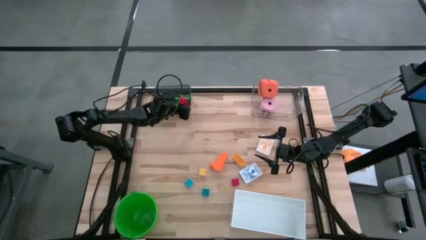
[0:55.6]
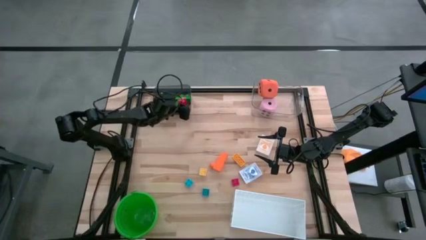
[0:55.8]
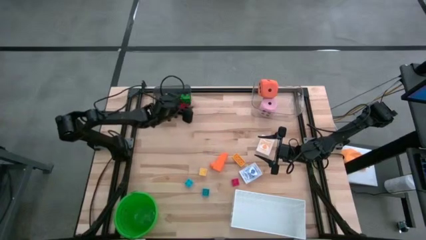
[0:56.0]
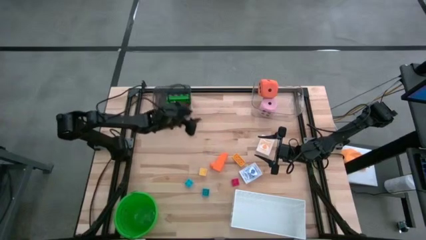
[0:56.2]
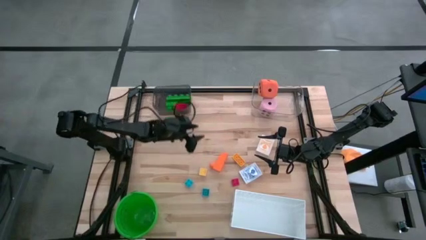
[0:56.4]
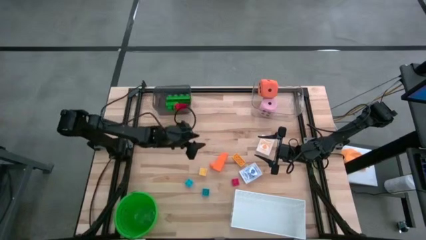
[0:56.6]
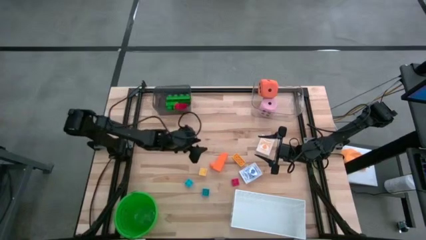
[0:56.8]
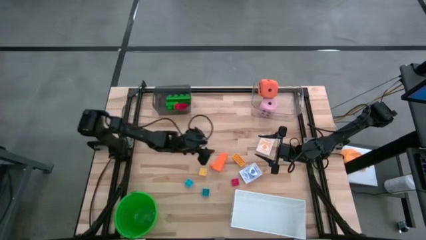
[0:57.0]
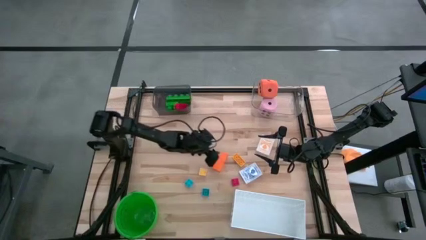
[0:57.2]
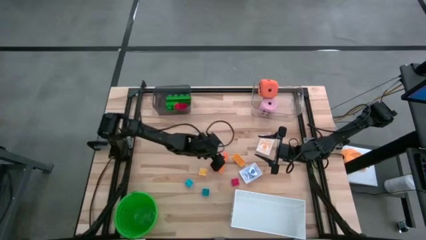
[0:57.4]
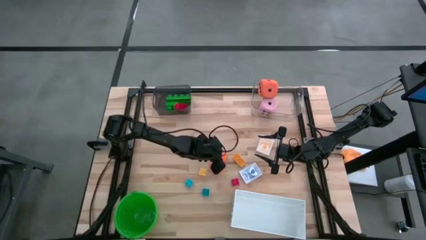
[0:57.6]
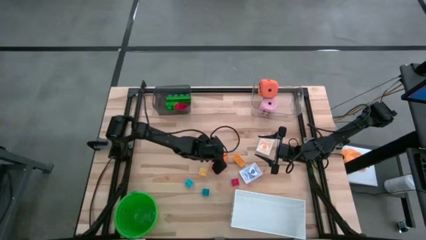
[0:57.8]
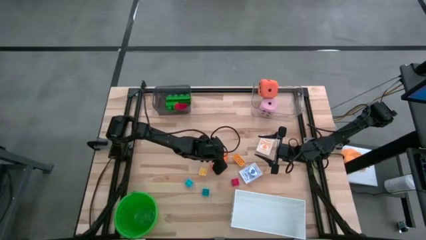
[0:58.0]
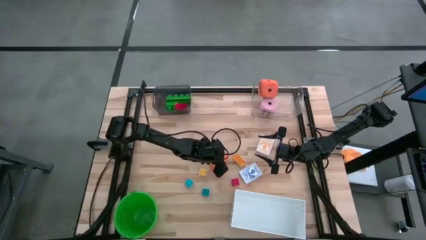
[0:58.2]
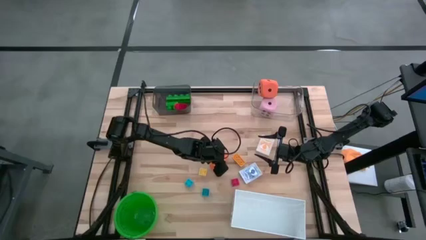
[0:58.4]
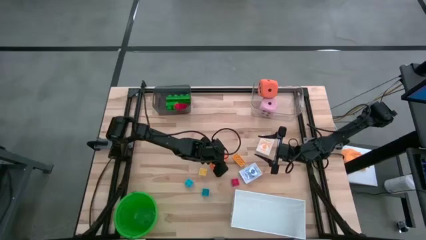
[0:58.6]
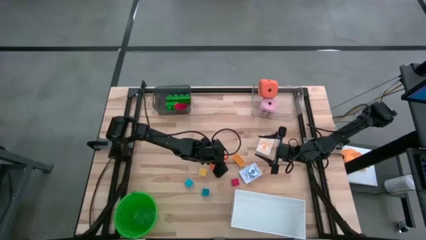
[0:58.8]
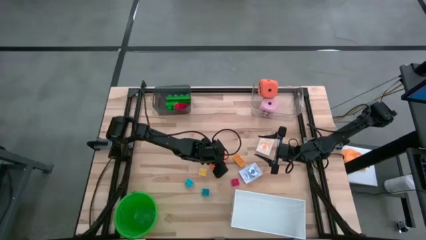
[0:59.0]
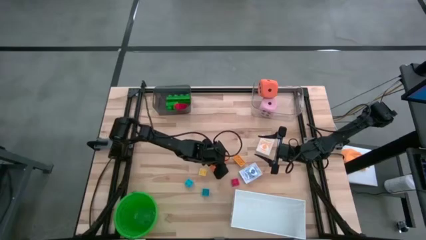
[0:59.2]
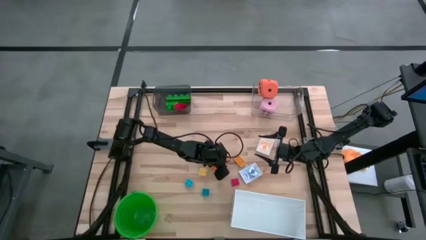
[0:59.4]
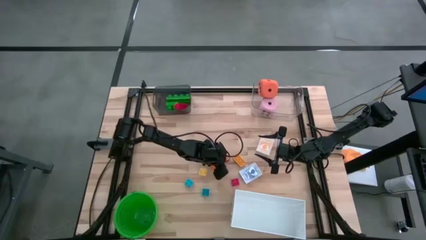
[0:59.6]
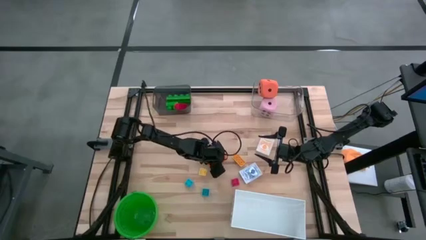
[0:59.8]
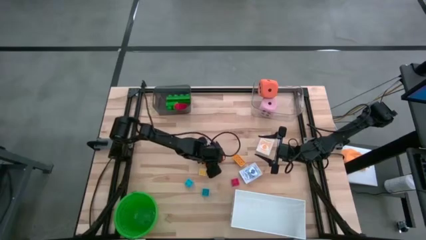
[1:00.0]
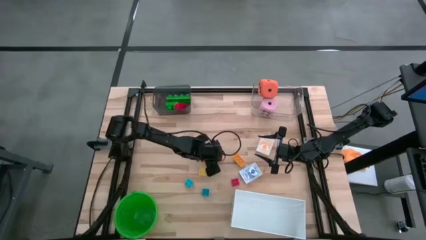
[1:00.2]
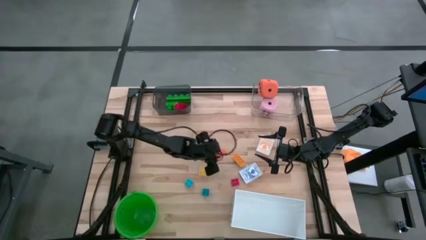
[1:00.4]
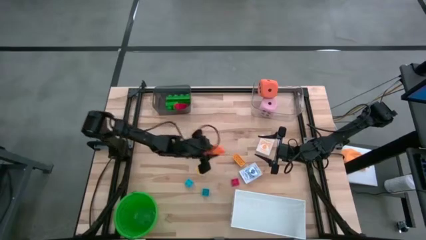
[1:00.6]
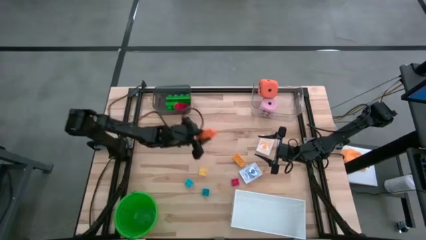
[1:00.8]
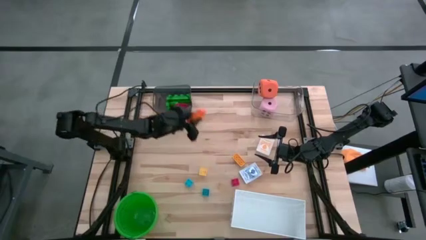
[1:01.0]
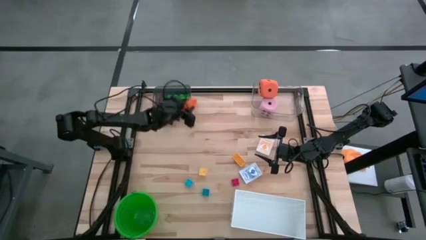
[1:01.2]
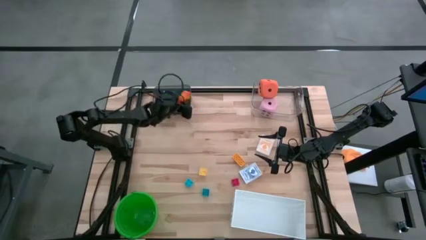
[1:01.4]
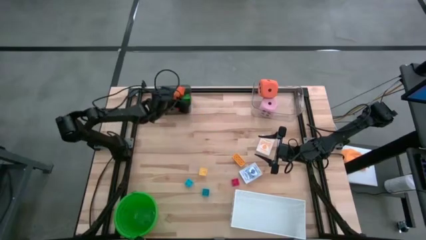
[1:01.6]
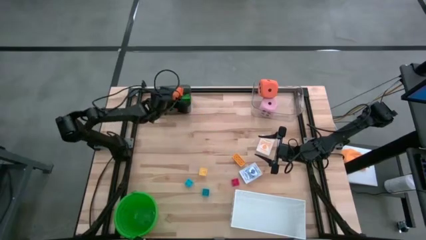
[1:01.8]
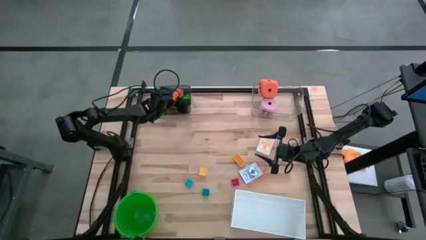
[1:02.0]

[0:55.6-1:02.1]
Task: Pick & Place Toys
Put the orange game piece into the black bin

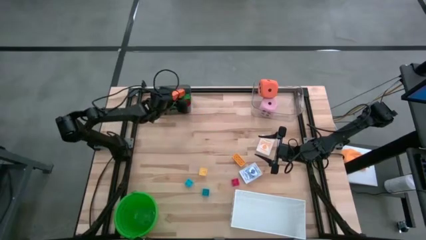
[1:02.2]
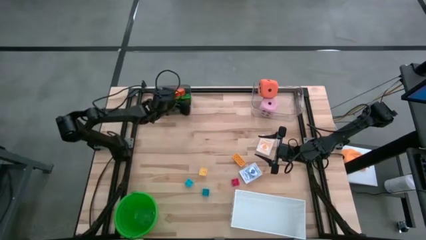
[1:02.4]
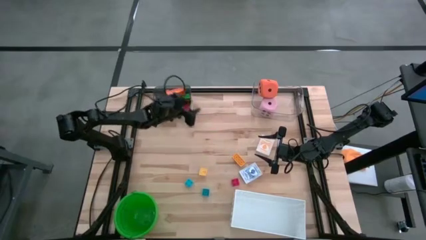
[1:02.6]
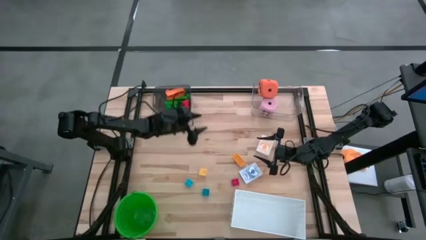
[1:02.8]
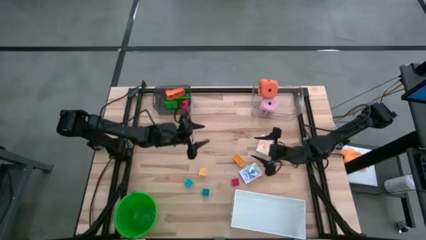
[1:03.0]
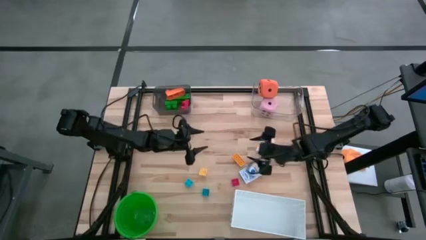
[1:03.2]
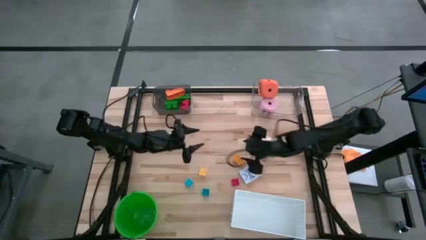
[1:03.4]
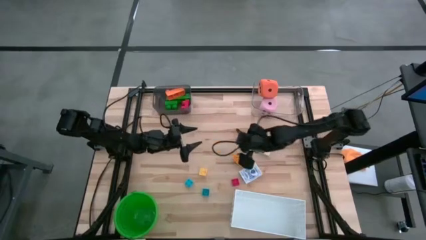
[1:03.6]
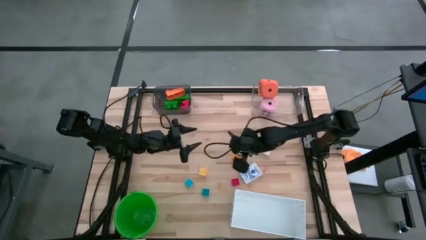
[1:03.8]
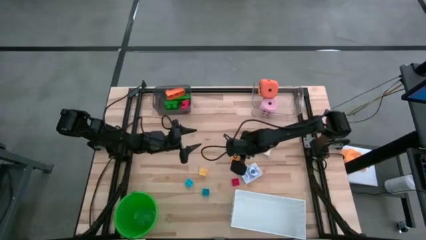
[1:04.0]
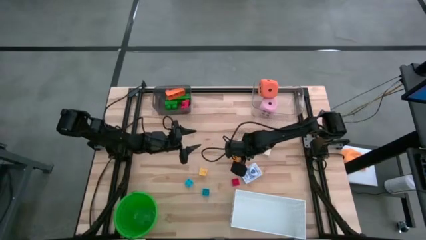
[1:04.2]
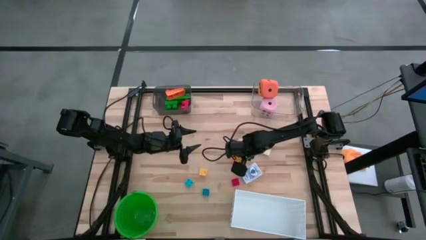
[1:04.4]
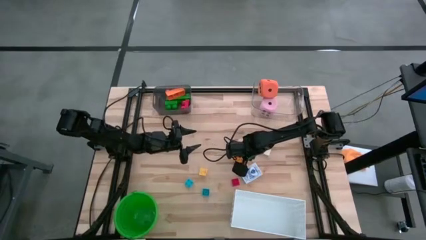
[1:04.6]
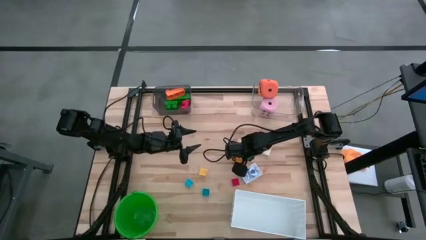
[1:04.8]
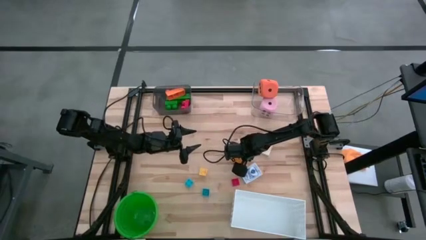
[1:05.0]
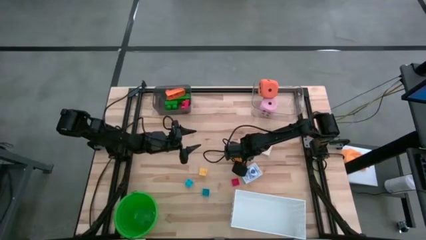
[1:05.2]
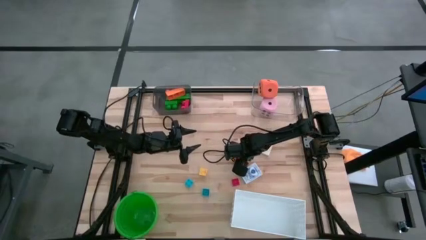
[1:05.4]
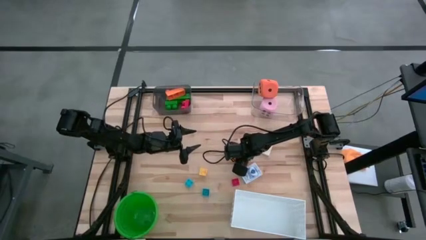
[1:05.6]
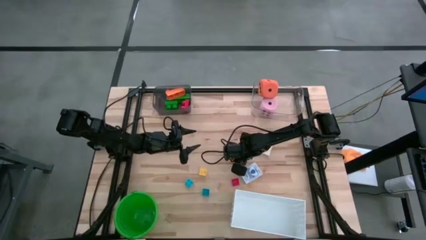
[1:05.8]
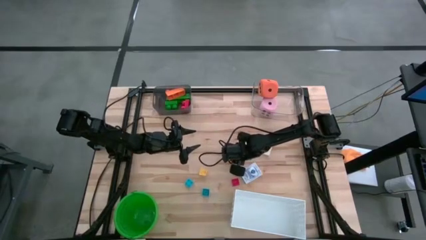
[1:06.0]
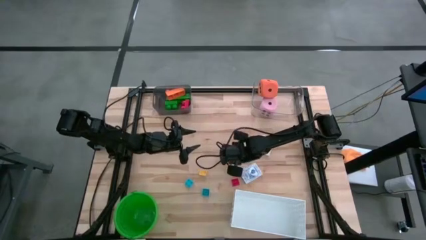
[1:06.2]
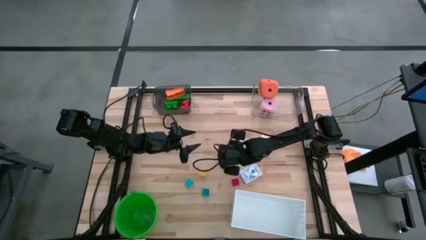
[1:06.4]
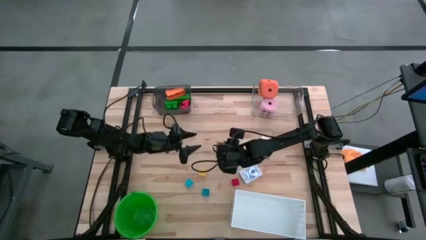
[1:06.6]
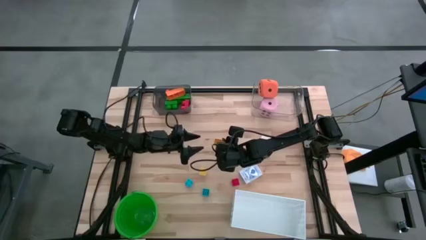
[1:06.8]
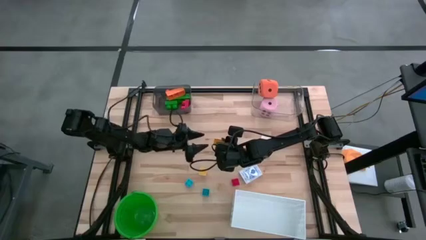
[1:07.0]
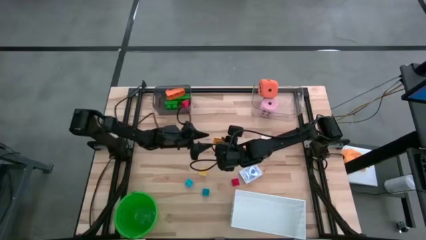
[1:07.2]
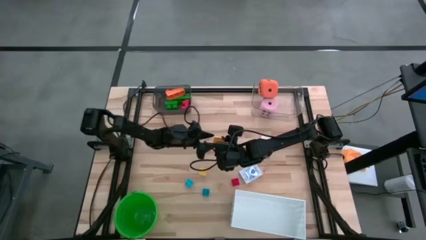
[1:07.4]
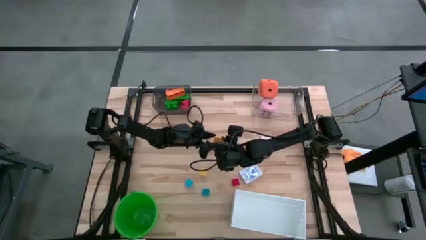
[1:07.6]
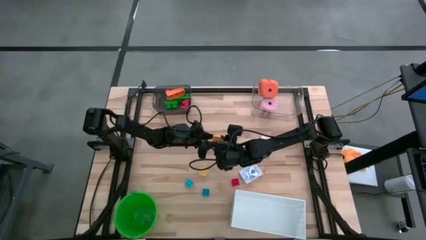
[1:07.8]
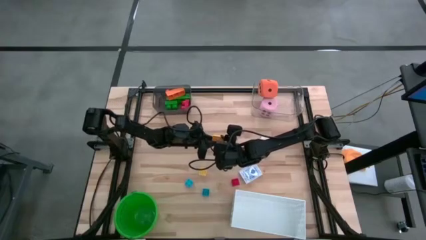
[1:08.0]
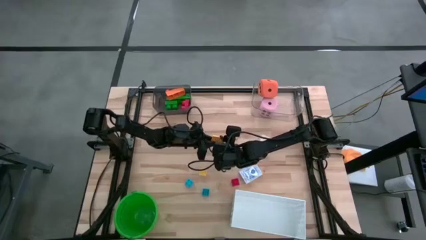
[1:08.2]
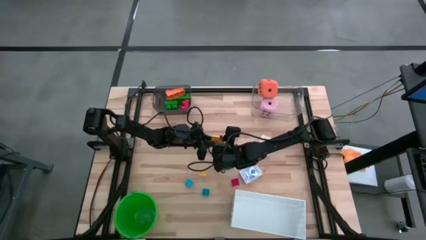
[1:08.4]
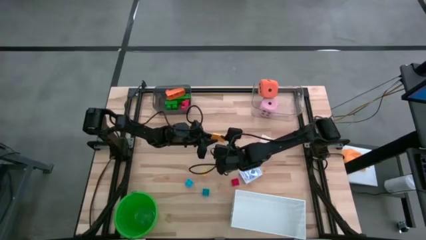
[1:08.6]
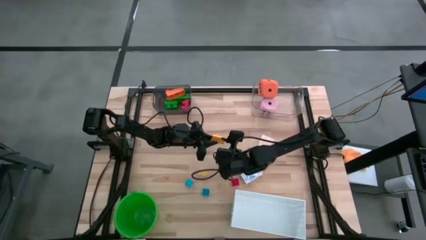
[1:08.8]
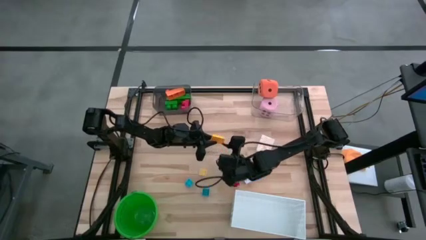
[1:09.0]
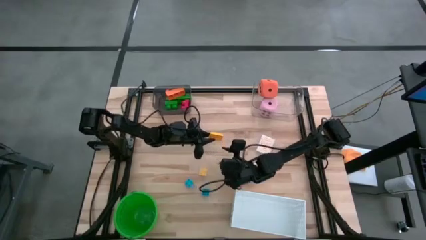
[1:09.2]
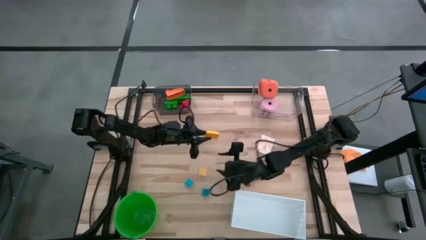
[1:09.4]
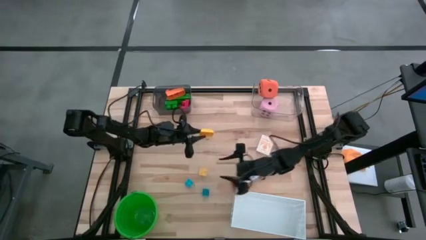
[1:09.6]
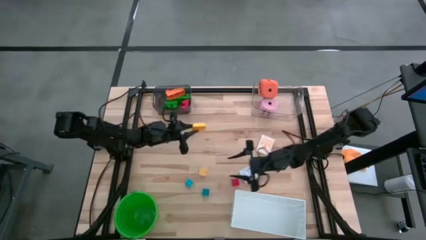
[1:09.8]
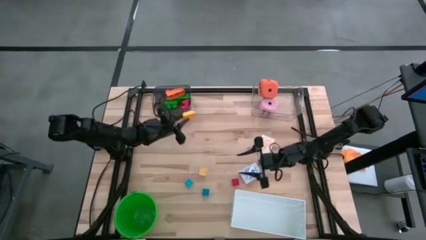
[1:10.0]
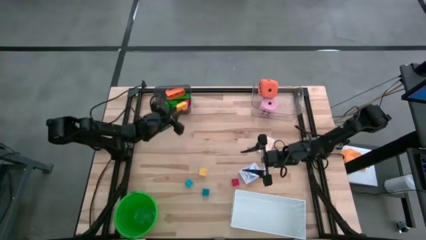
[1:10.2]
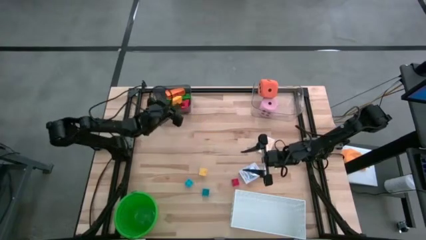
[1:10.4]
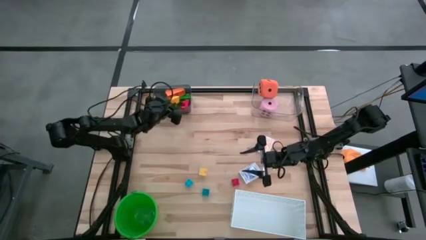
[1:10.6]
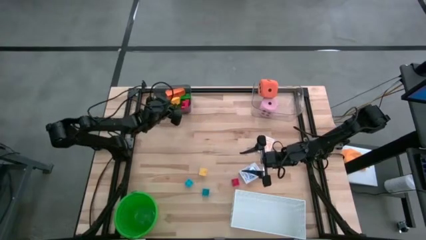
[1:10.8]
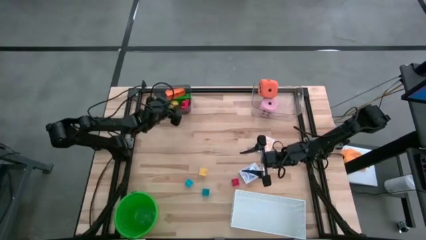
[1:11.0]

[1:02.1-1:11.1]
Put the yellow game piece into the black bin
